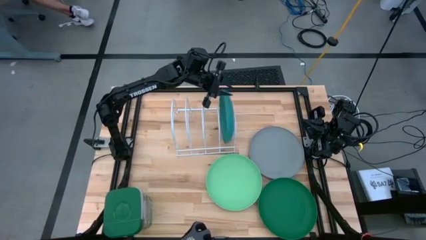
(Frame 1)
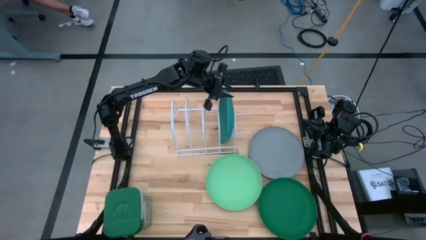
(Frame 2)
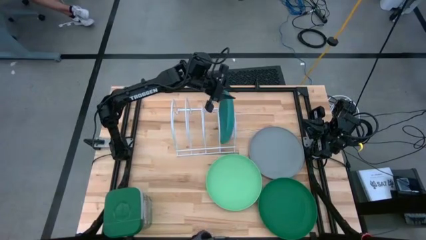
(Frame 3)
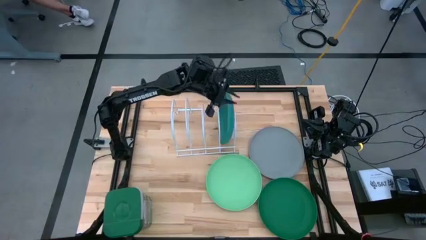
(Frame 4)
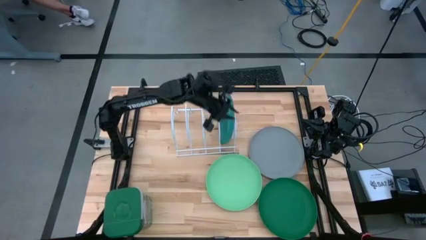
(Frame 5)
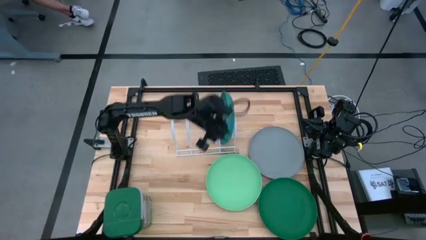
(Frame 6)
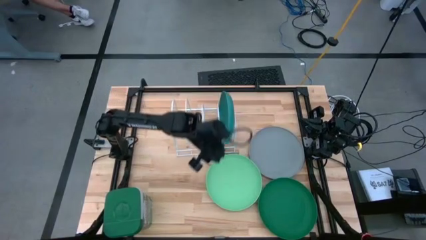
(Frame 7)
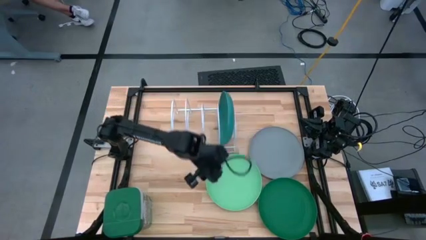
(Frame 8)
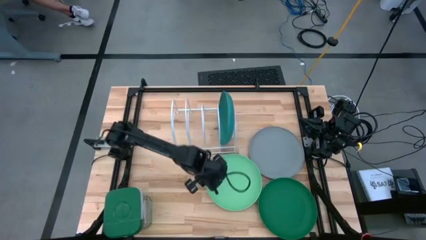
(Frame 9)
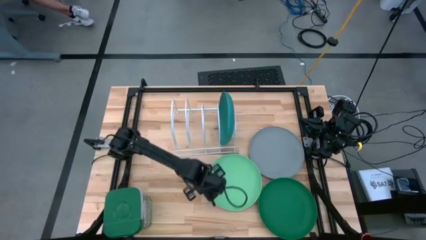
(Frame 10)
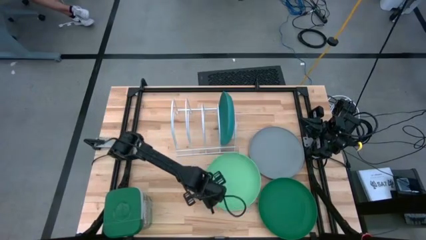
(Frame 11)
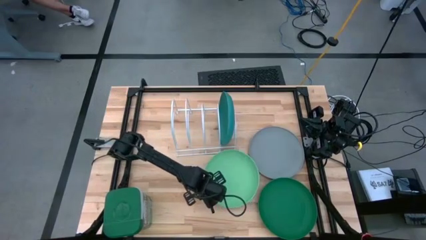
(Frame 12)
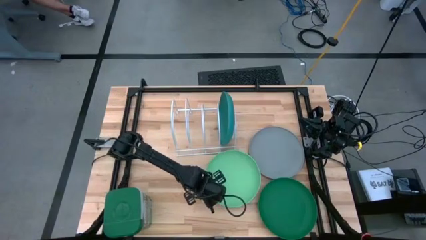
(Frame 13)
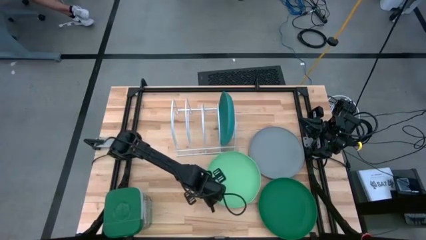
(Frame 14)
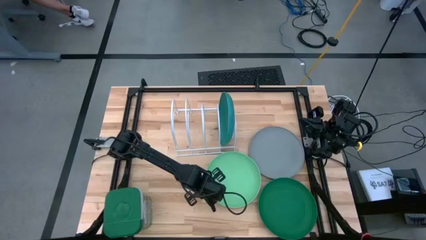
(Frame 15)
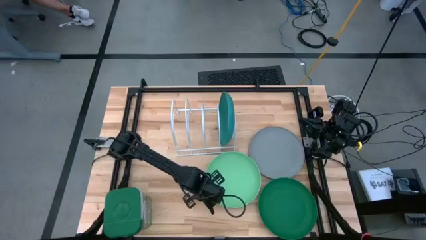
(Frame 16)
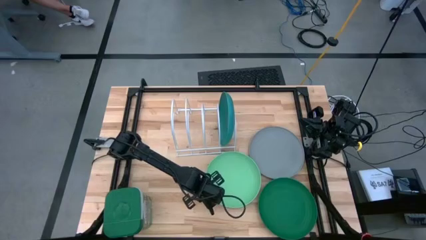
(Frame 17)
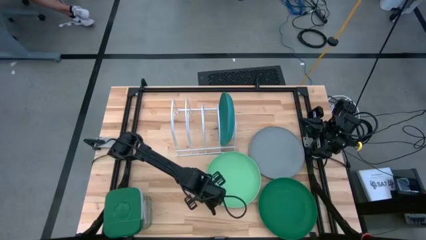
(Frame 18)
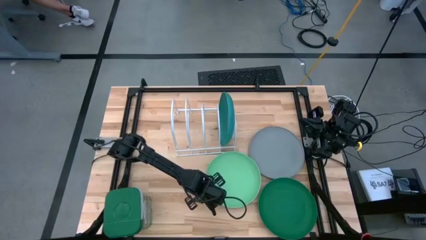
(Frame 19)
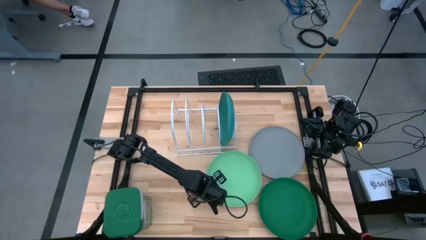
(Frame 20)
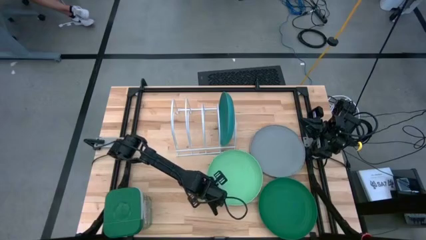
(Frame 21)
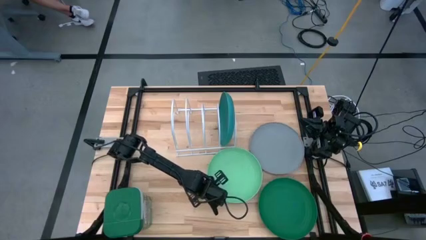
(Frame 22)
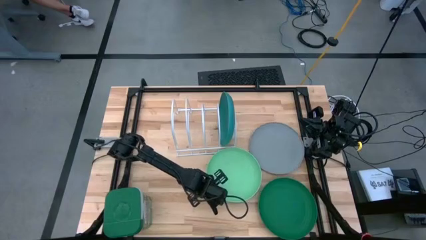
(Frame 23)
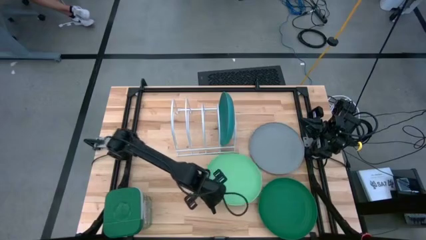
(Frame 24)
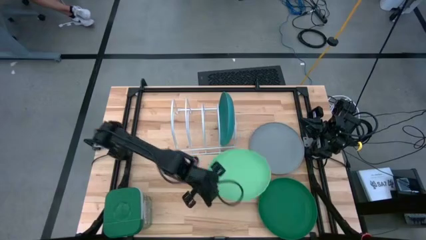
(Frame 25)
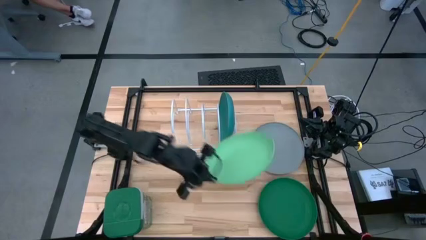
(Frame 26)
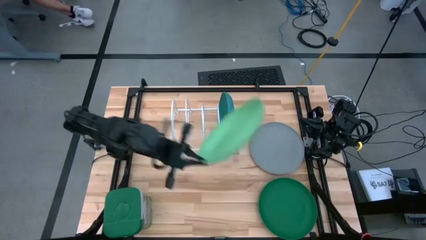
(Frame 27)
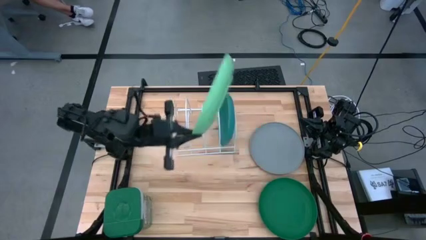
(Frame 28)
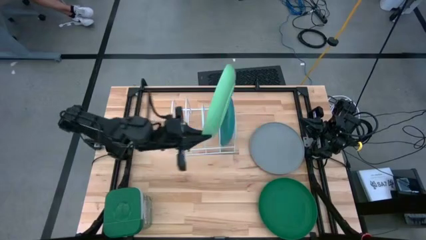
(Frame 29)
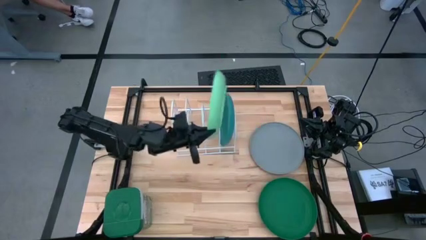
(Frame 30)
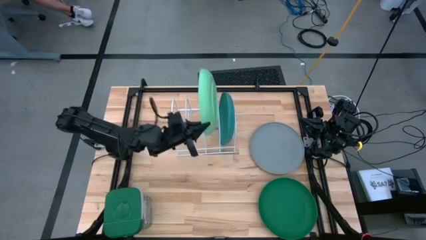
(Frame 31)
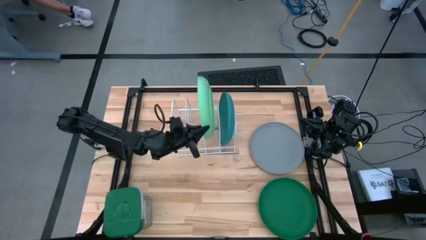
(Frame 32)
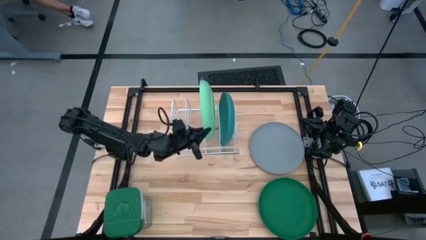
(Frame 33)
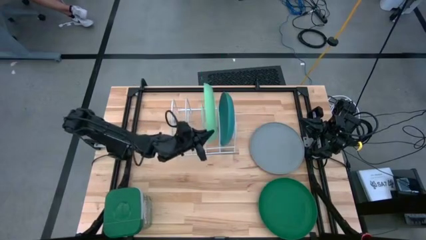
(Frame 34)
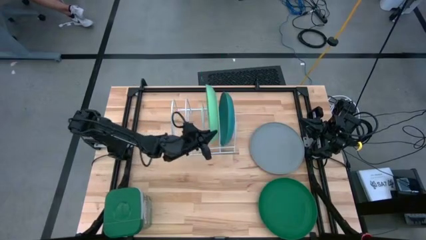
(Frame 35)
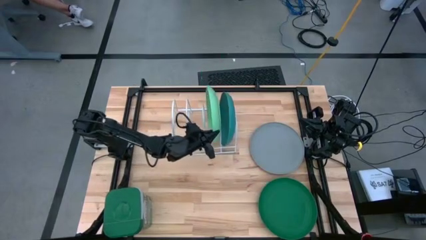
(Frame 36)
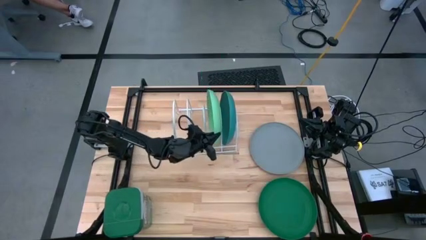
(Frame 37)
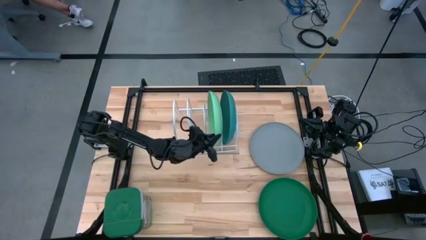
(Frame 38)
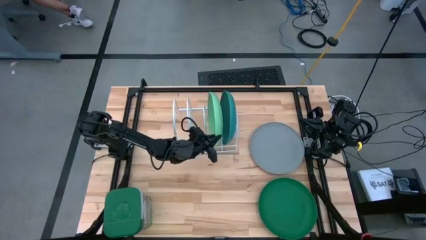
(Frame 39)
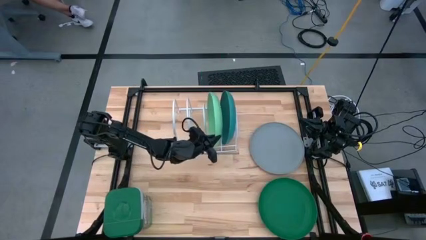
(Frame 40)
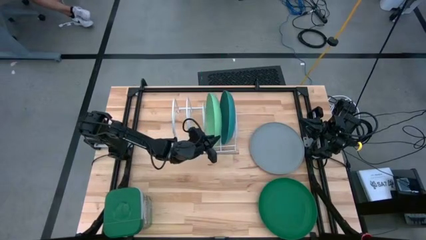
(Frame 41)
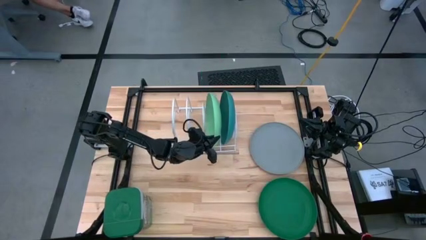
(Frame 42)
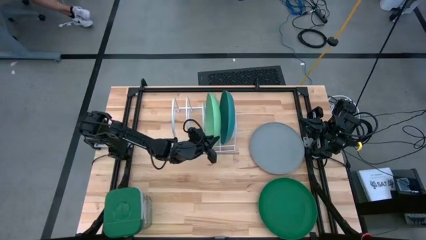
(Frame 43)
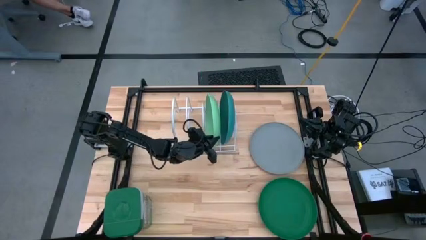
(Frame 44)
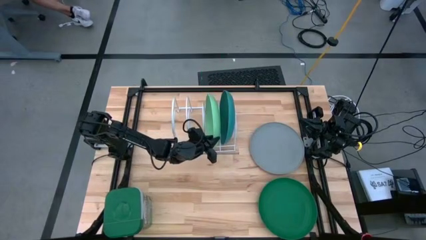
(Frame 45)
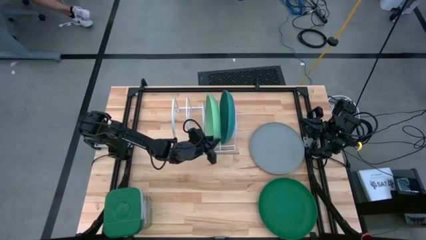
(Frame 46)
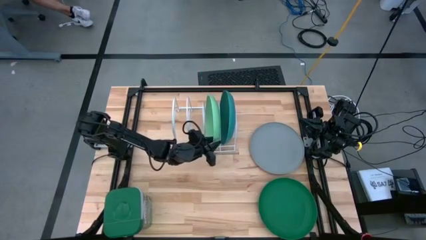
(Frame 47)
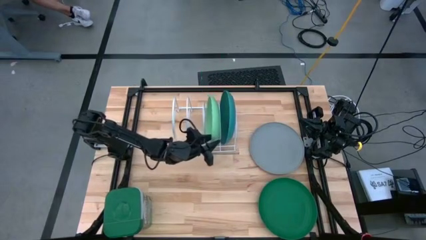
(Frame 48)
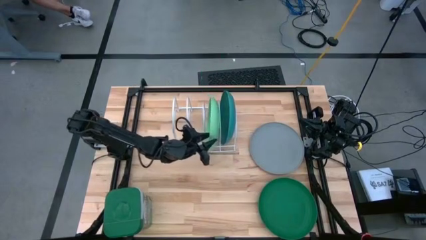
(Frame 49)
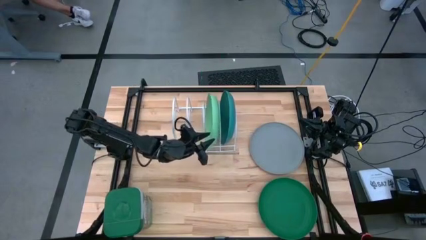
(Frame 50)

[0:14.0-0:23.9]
Task: Sort dishes
Put the light green plate into the dish rack
